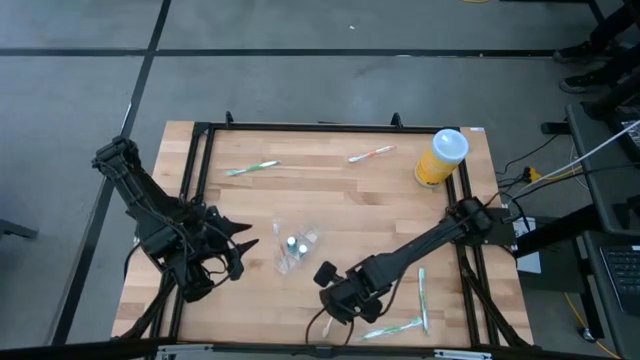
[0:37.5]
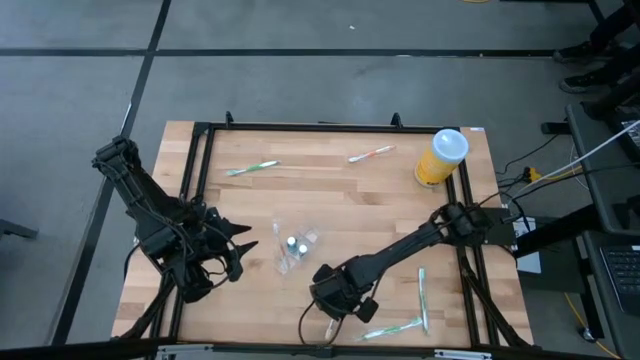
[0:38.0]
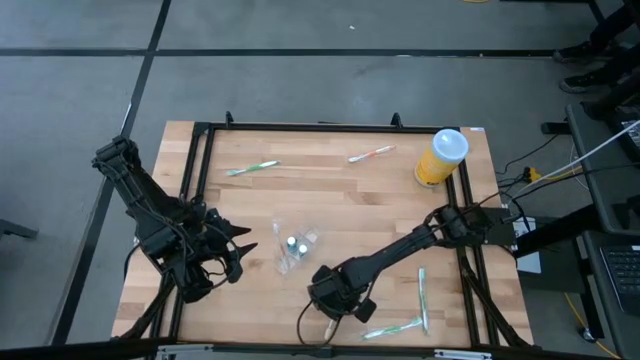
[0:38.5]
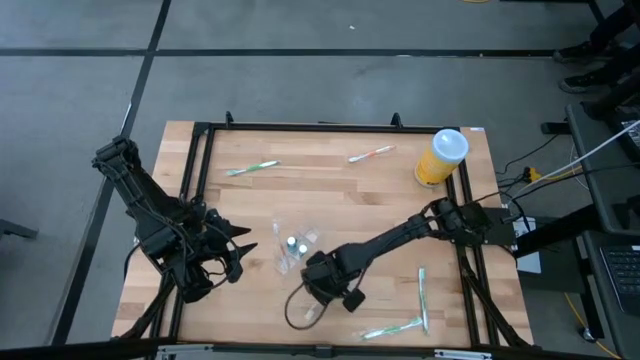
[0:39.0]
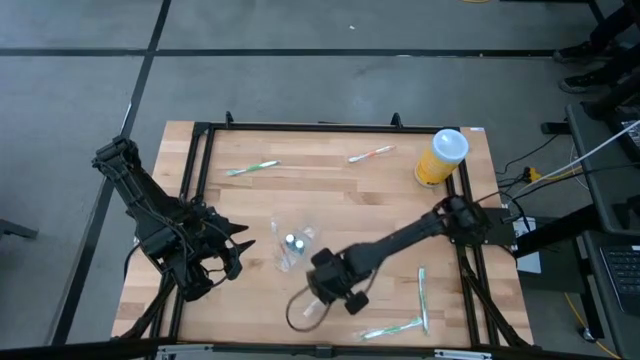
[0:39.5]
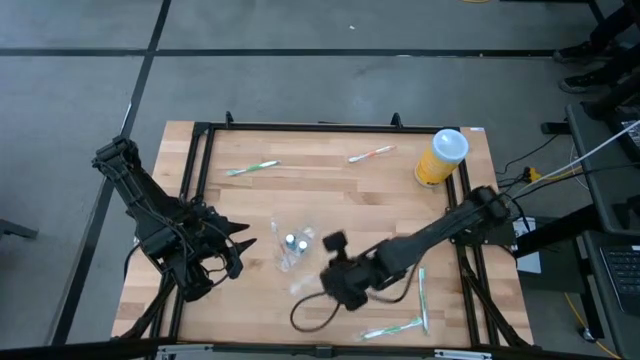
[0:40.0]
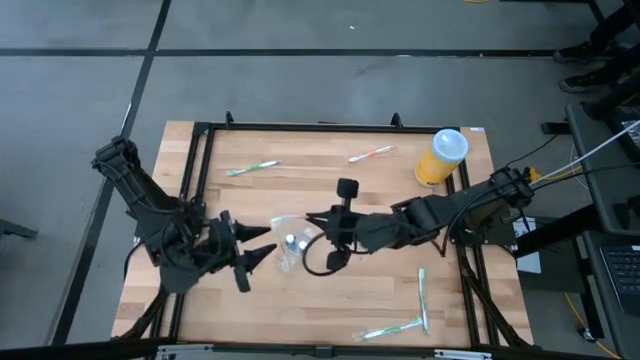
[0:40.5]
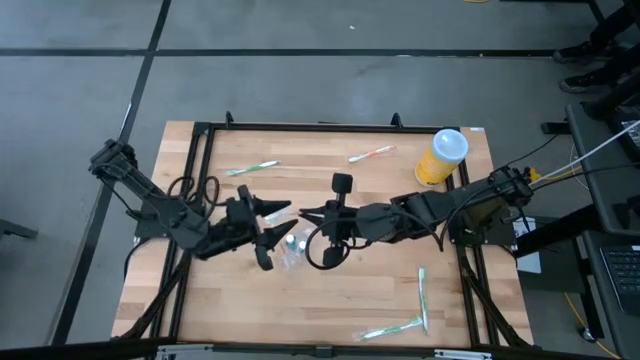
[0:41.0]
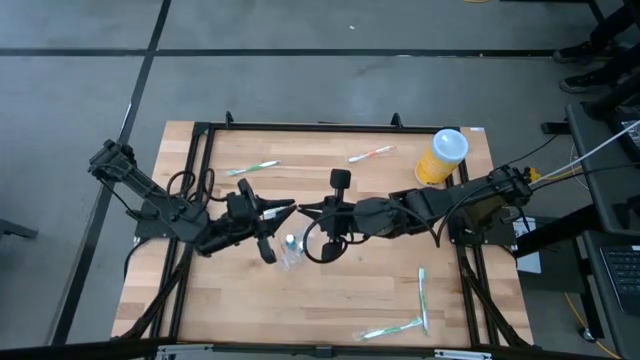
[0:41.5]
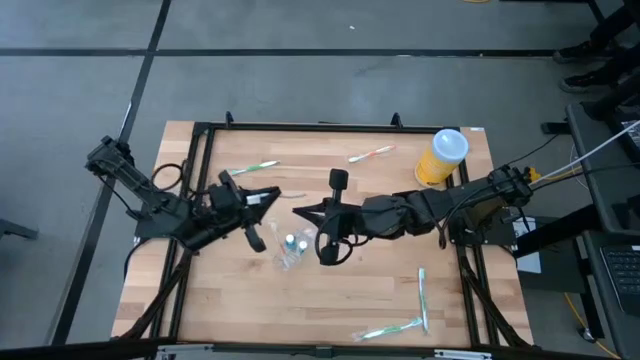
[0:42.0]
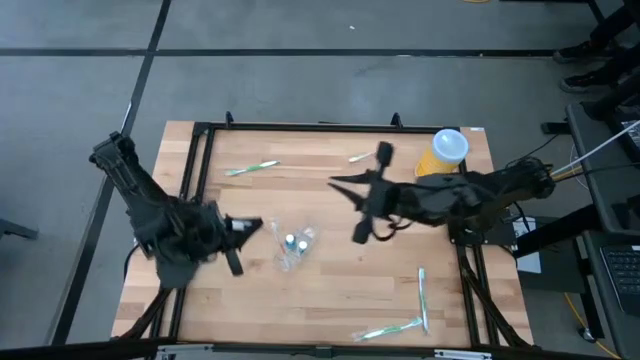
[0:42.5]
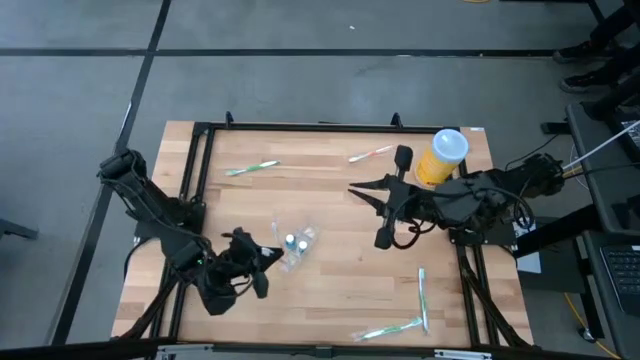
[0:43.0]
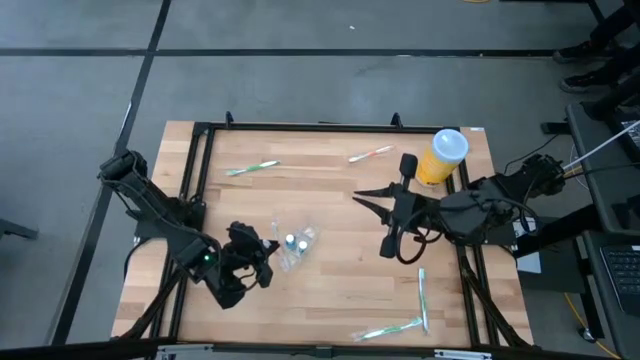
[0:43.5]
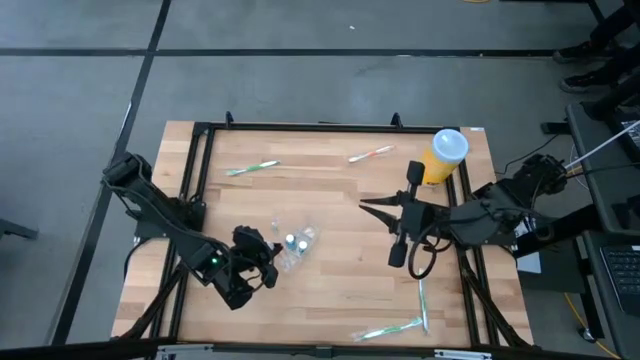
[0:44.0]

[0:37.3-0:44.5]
Task: Pick & Place toothbrushing station
Put the bottom orange toothbrush into the transparent organizer

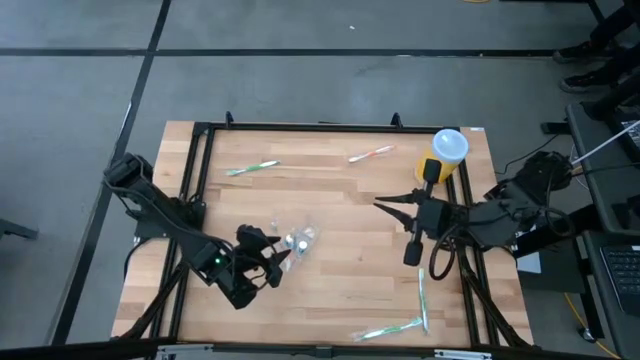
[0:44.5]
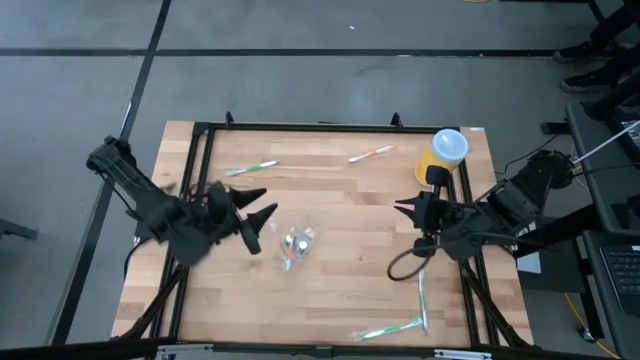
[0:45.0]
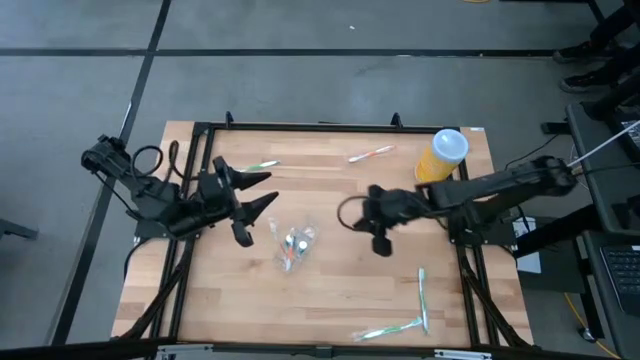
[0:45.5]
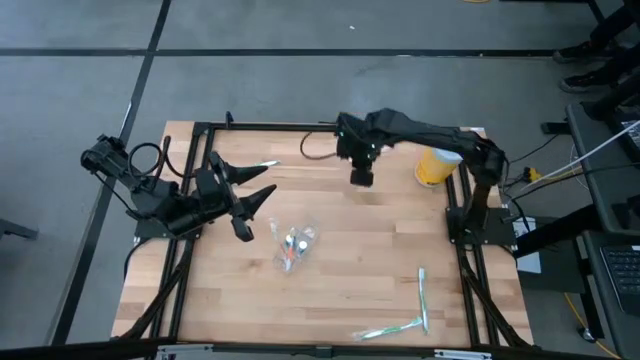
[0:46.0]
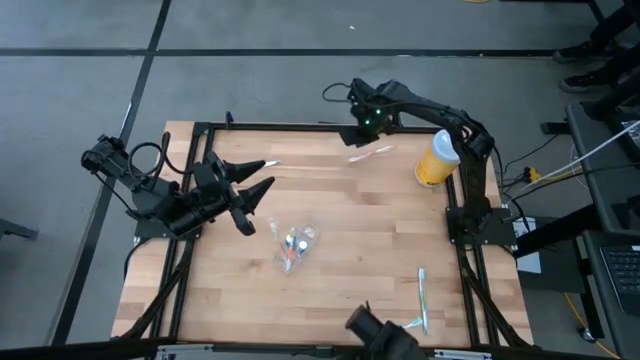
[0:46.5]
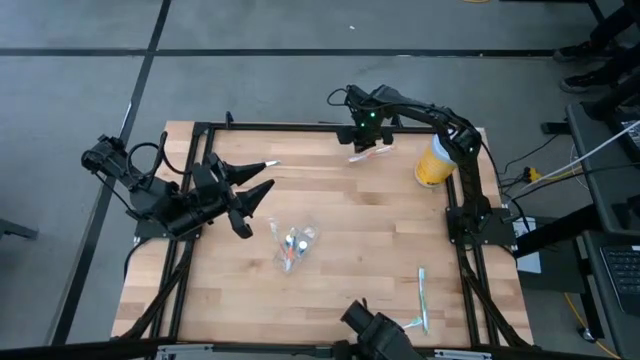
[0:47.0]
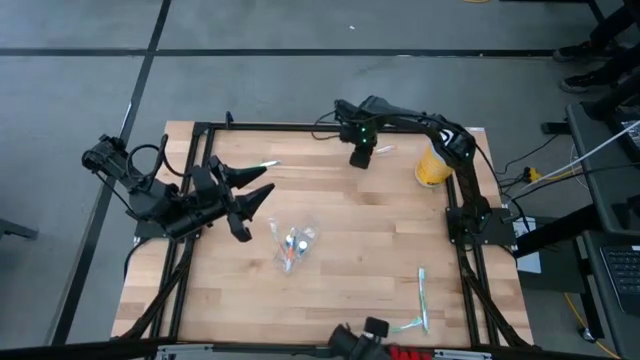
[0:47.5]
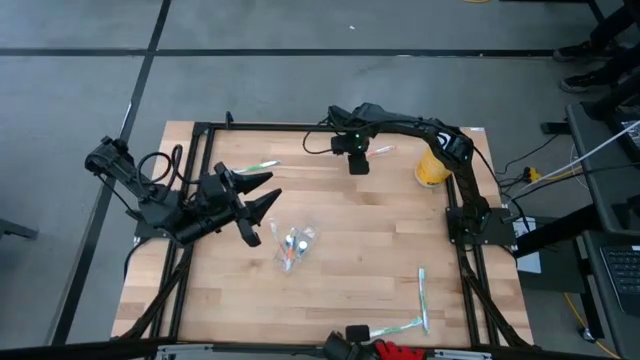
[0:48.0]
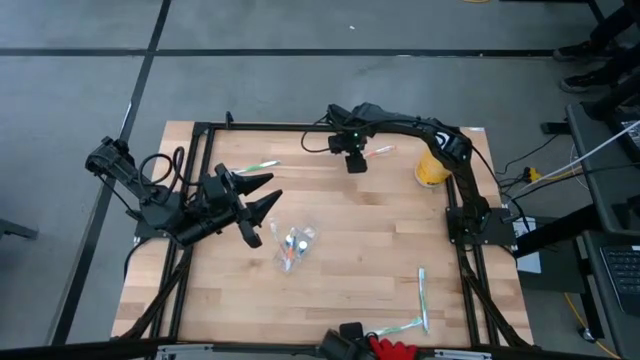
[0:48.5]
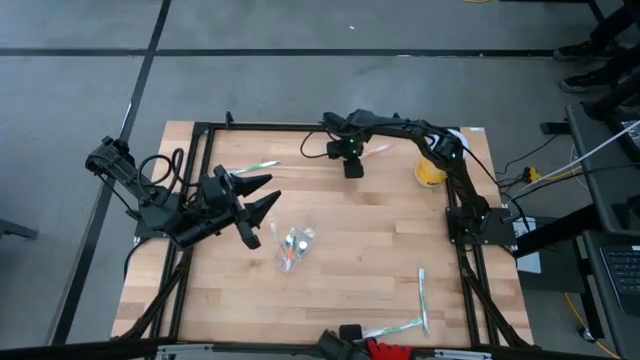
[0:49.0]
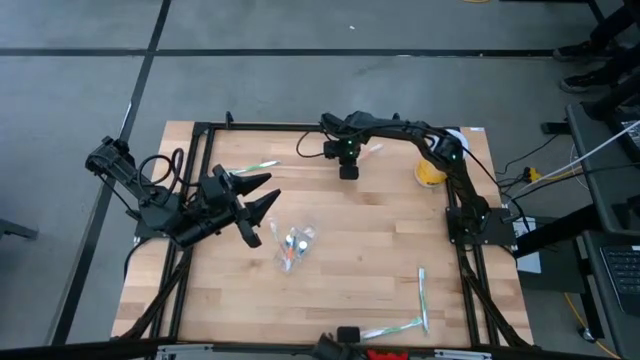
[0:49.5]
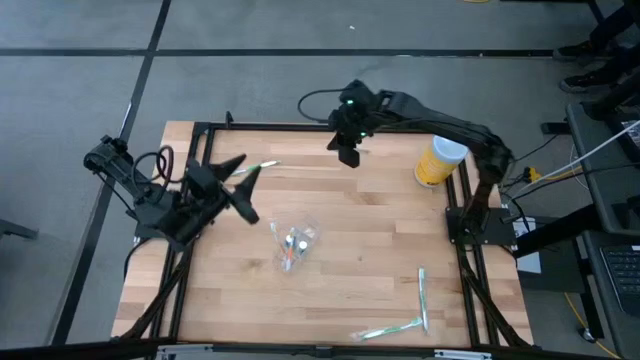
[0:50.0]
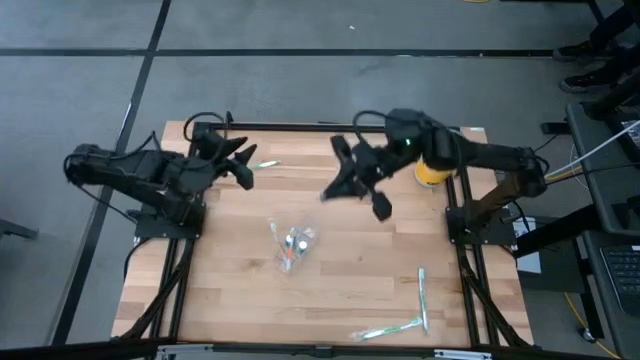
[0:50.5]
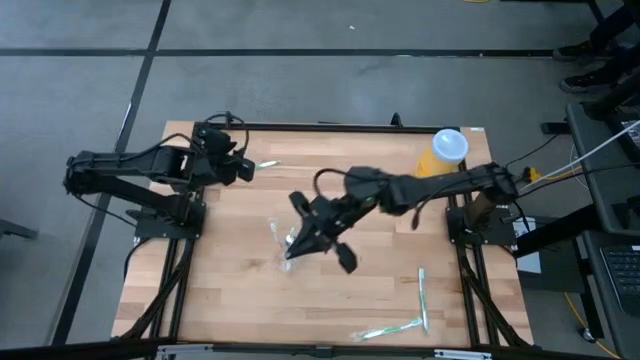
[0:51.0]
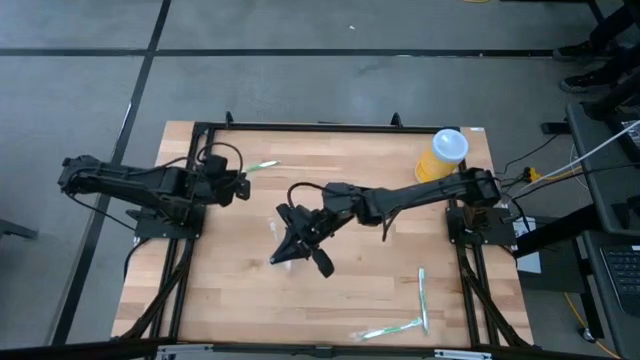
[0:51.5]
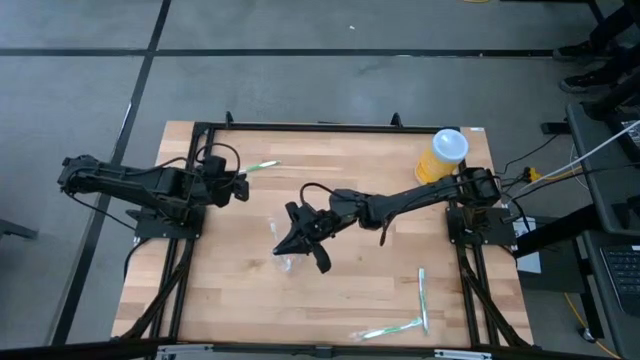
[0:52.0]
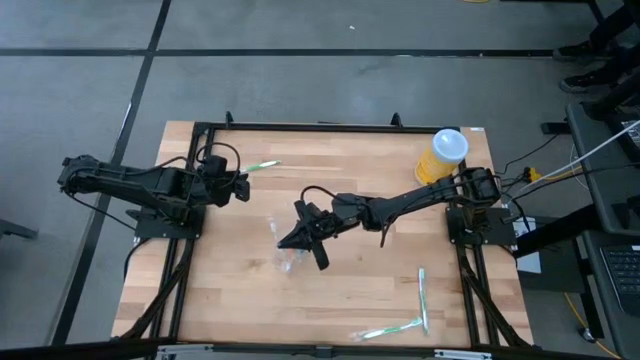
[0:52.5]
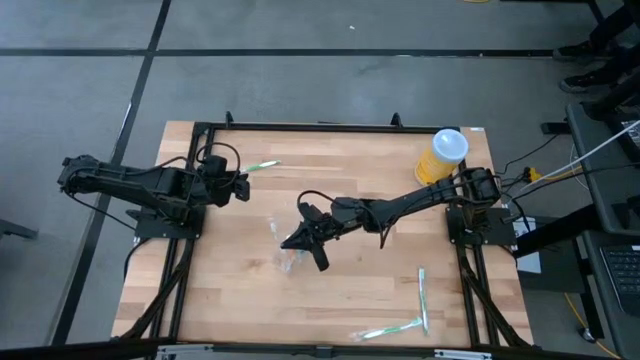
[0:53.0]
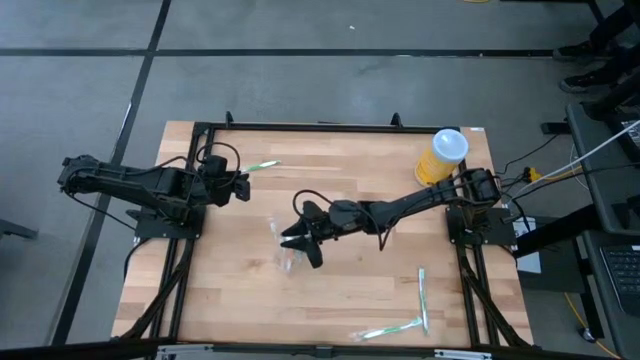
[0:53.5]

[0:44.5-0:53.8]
Put the orange toothbrush into the transparent organizer

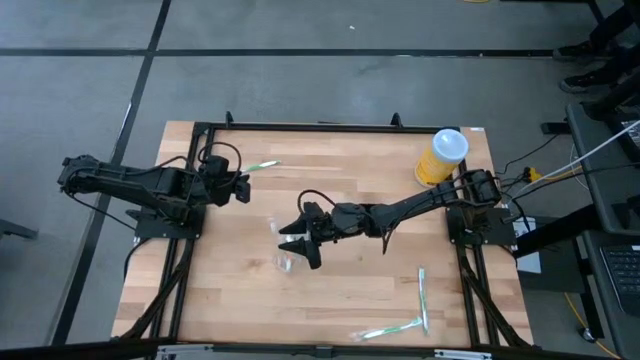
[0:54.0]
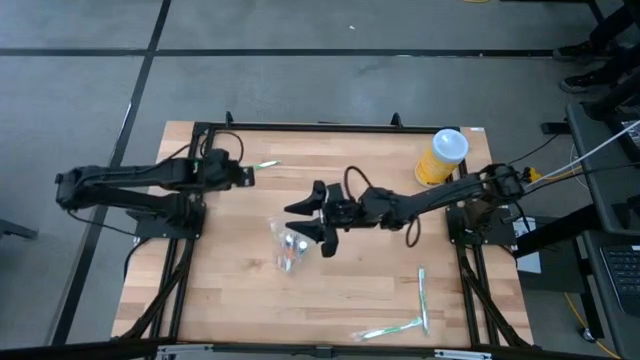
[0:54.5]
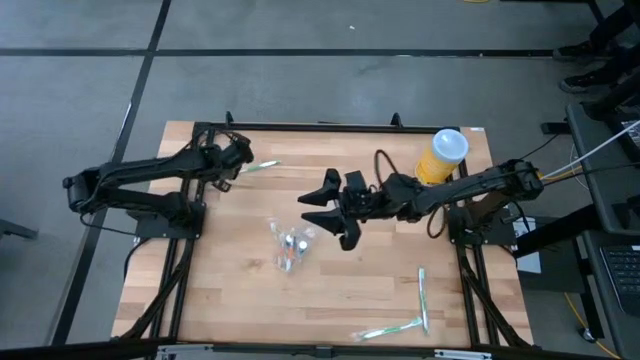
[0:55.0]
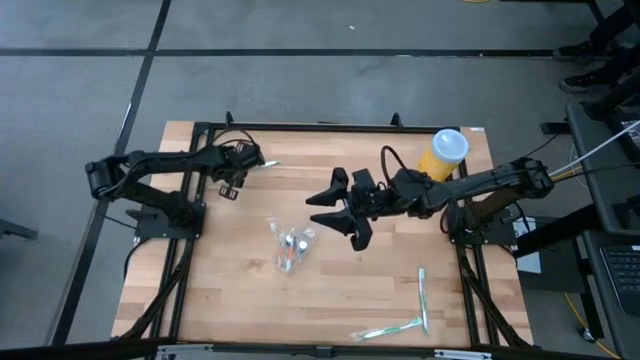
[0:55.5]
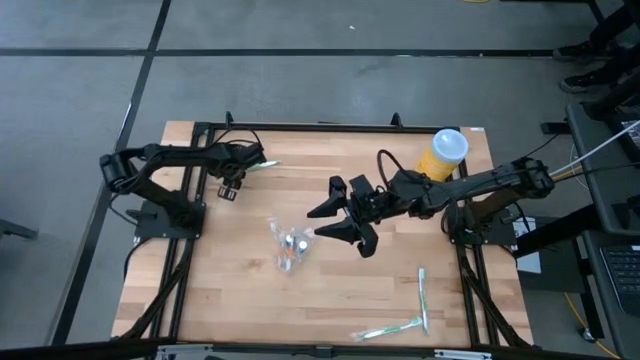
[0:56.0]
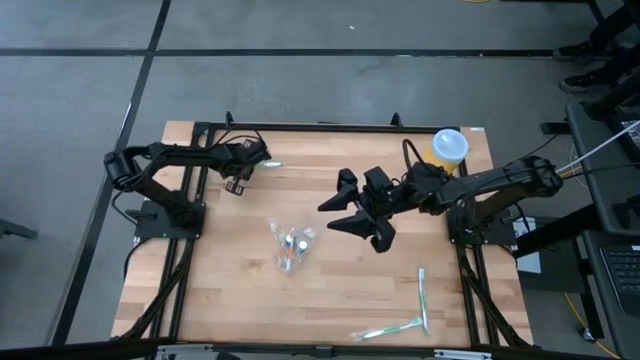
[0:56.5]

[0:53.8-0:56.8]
Put the top left green toothbrush into the transparent organizer

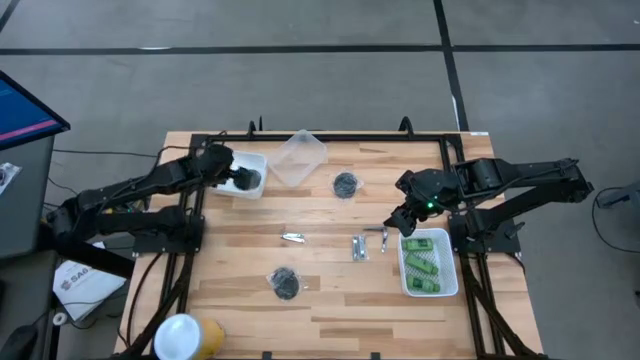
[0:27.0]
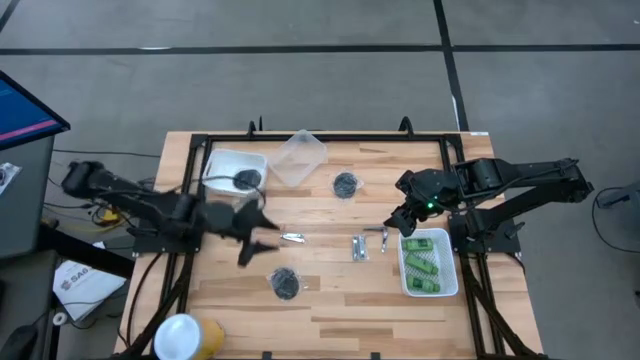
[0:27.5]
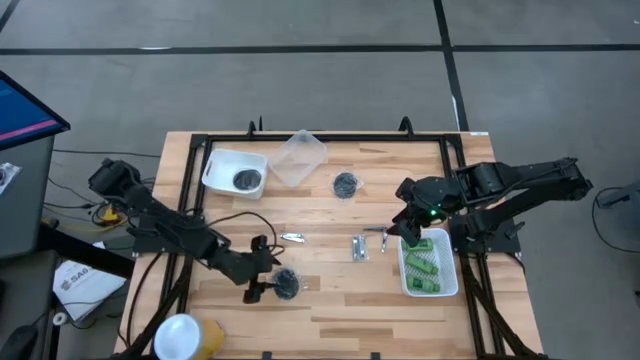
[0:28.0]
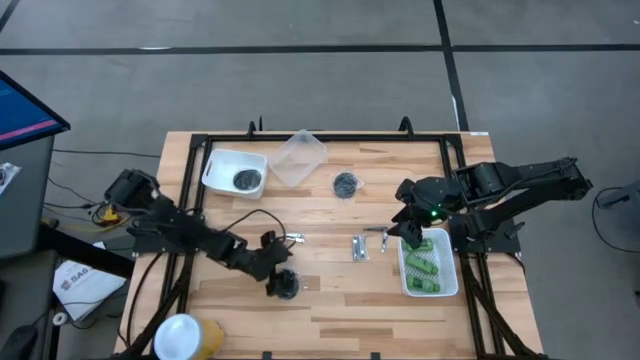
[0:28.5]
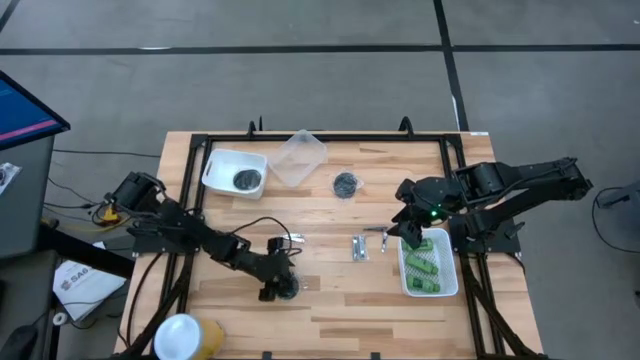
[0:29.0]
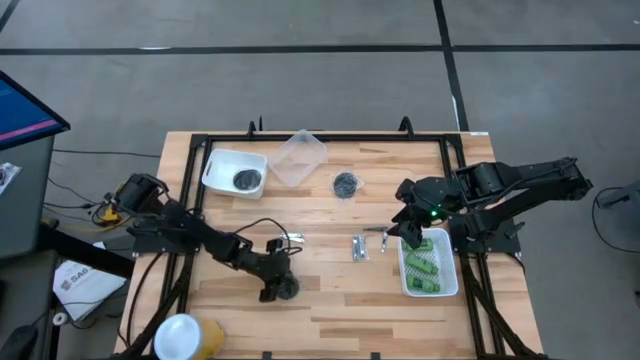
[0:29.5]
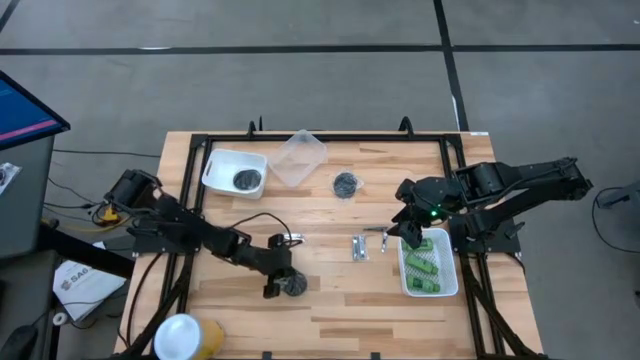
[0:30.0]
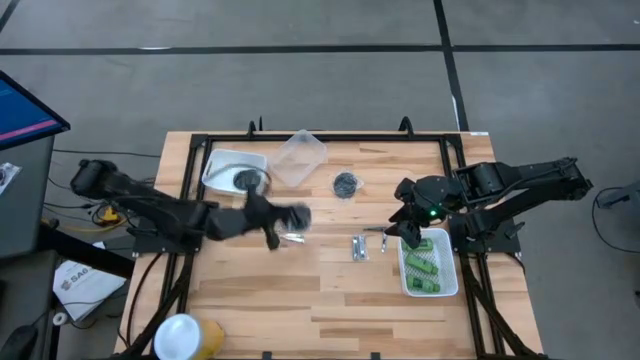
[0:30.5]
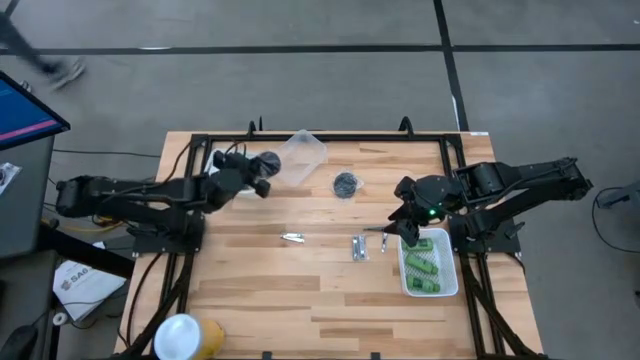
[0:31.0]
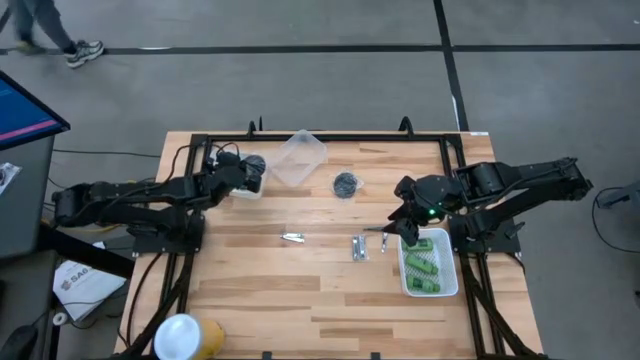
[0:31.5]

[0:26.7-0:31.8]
Task: Pick & Place Travel size toiletries
Put the black hairbrush into the top white bin
